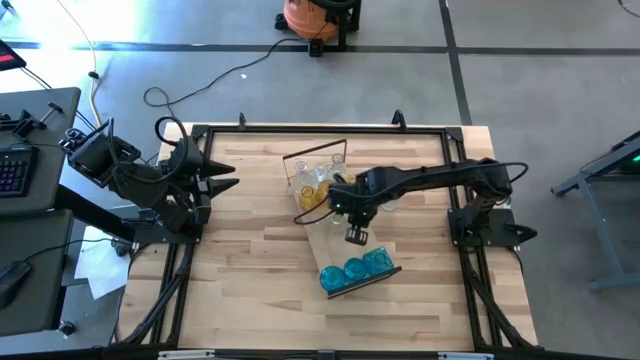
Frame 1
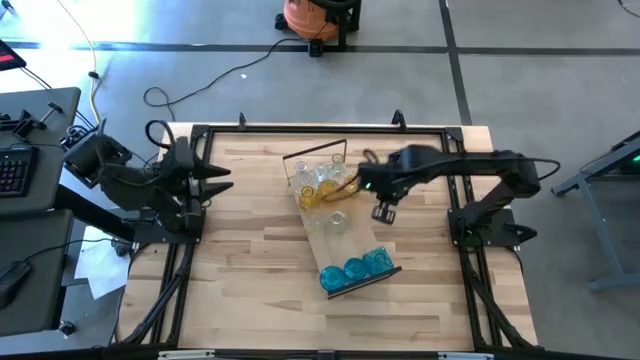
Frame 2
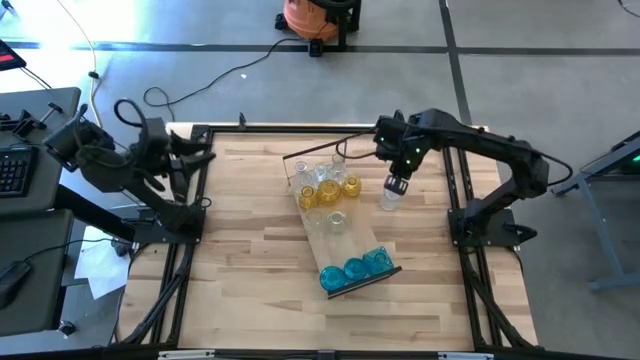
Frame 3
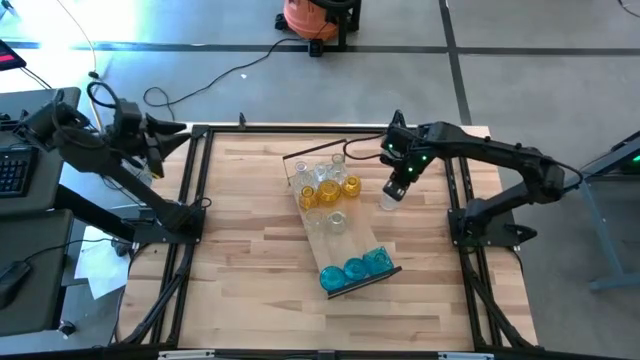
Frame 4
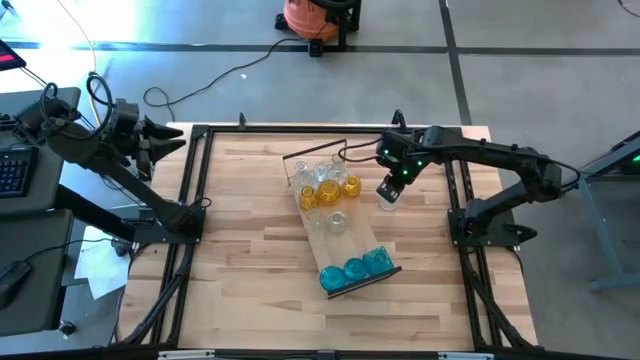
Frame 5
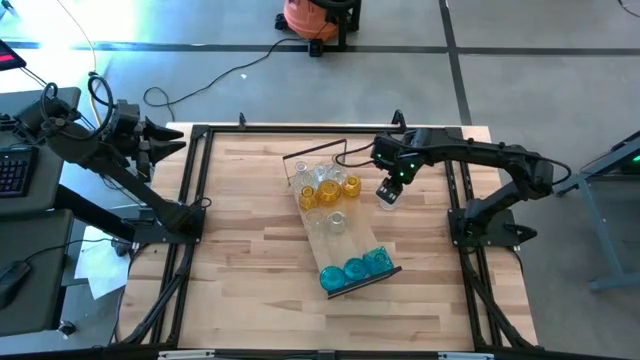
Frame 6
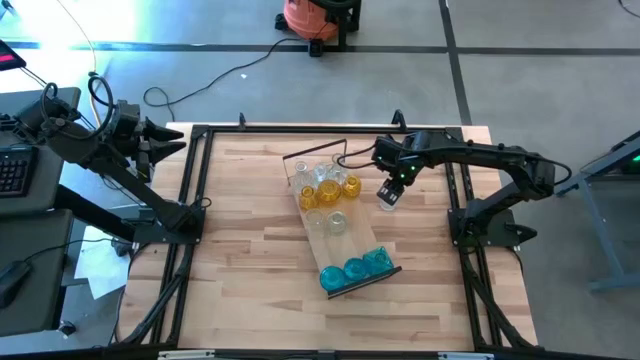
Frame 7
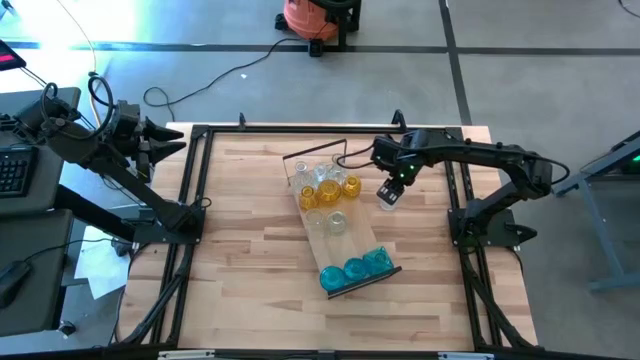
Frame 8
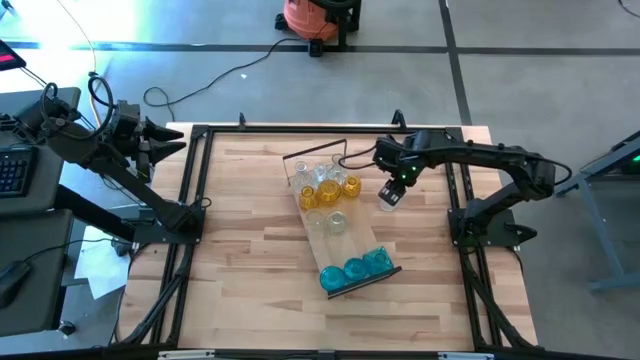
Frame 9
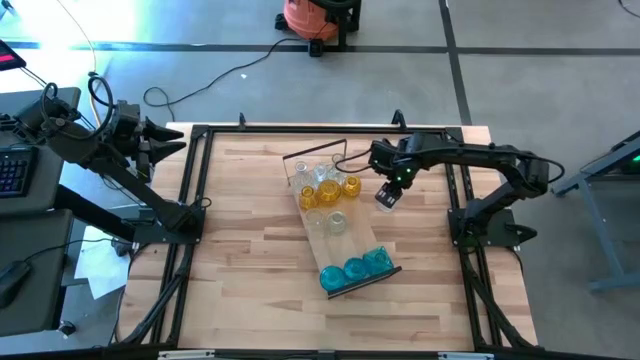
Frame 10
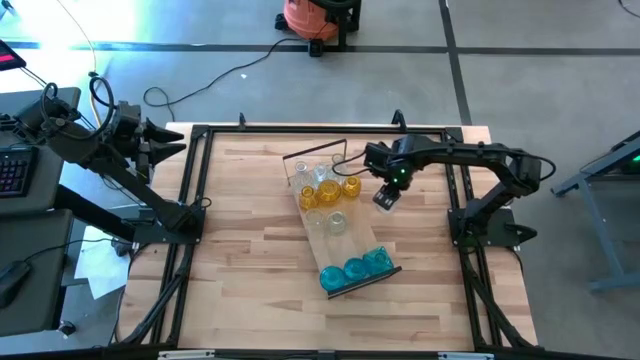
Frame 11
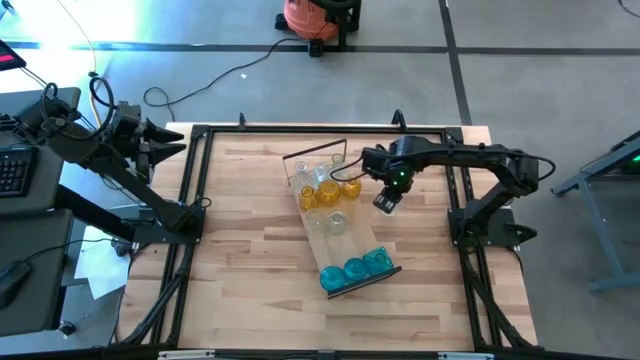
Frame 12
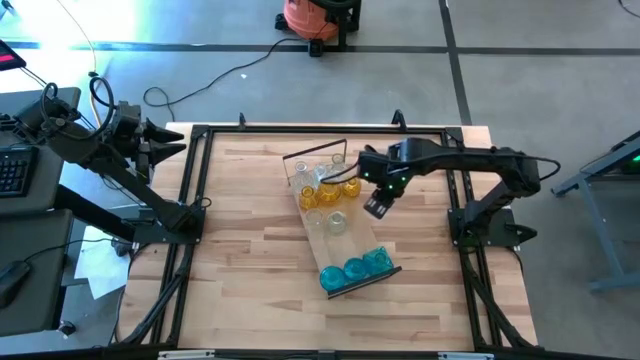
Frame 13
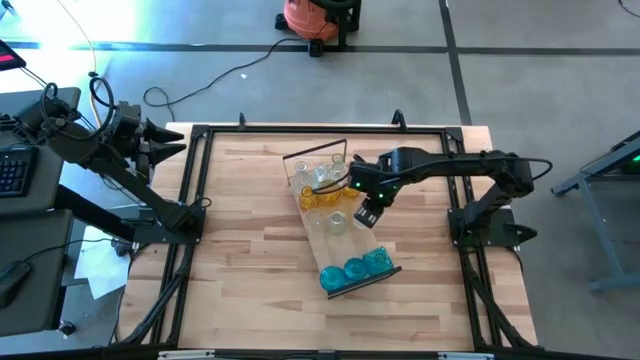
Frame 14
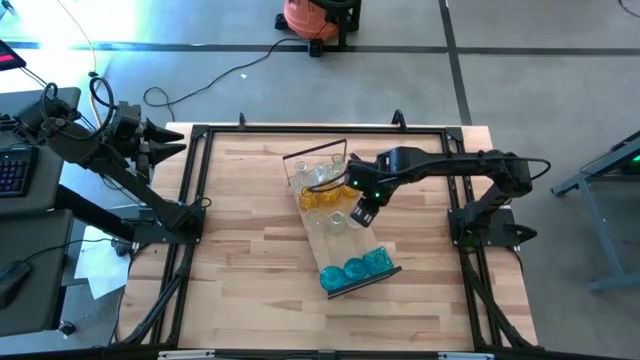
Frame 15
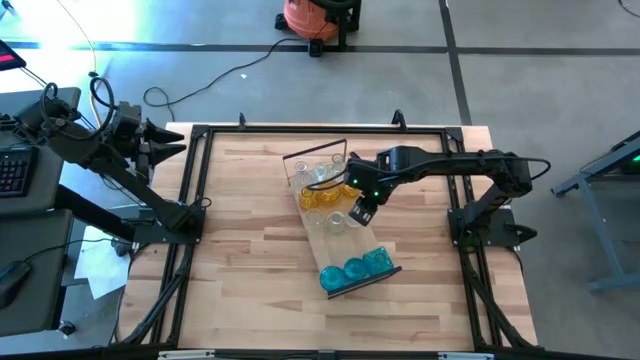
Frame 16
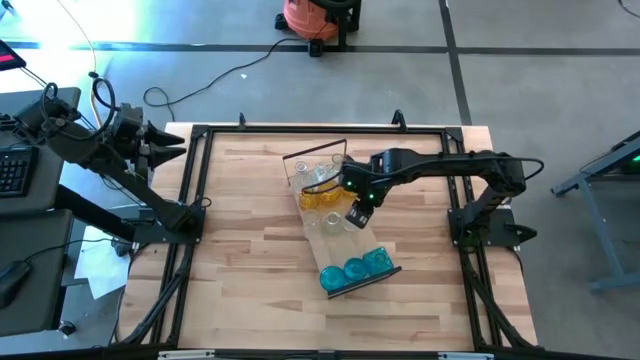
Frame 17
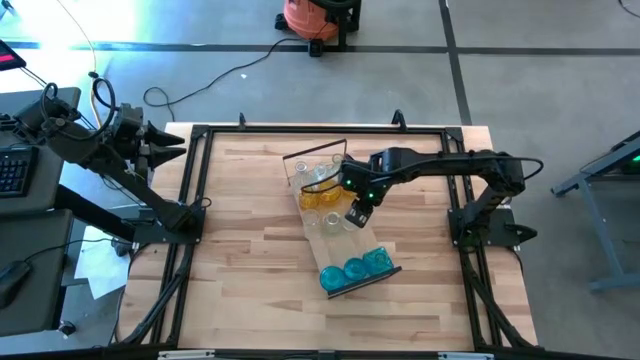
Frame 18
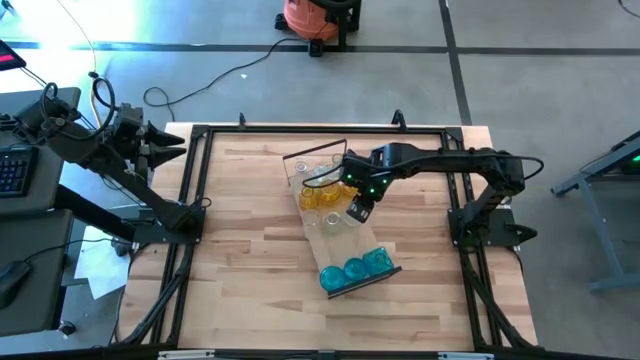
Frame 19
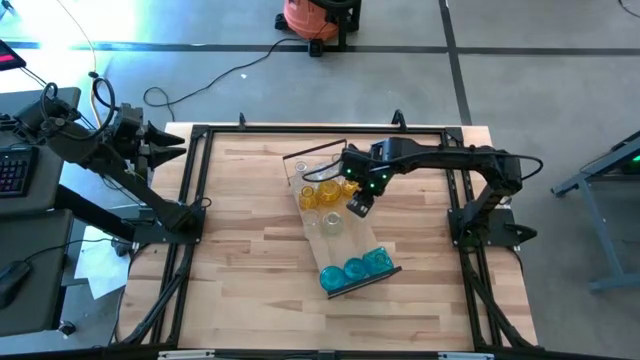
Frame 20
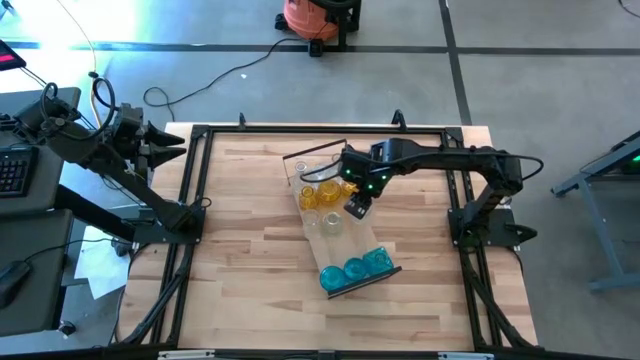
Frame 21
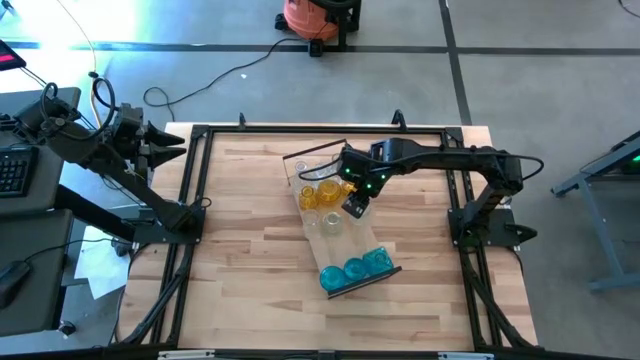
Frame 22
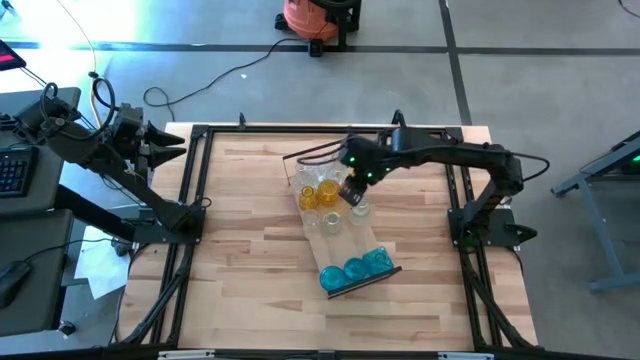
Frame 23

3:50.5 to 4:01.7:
Task: sort vases onto shelf
Put the transparent crystal vase on the shelf aligned with the other transparent crystal vases

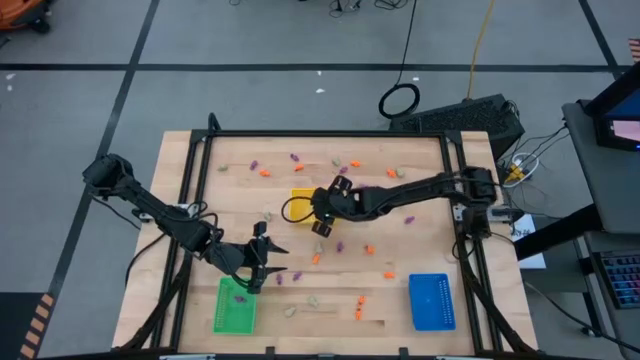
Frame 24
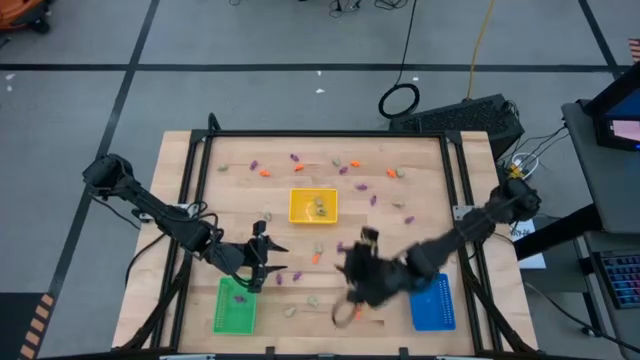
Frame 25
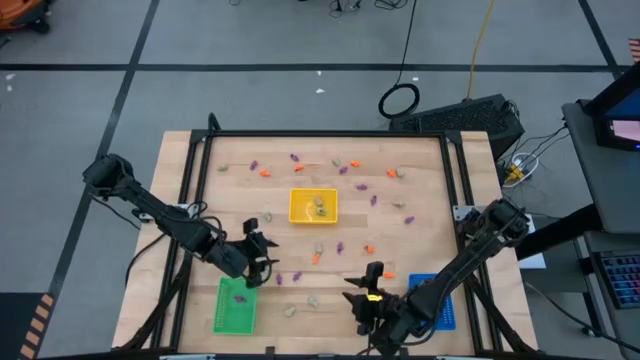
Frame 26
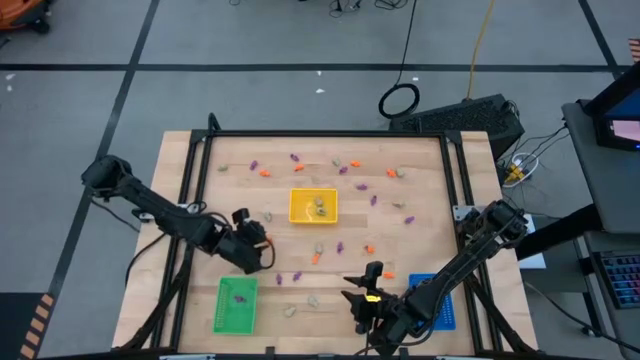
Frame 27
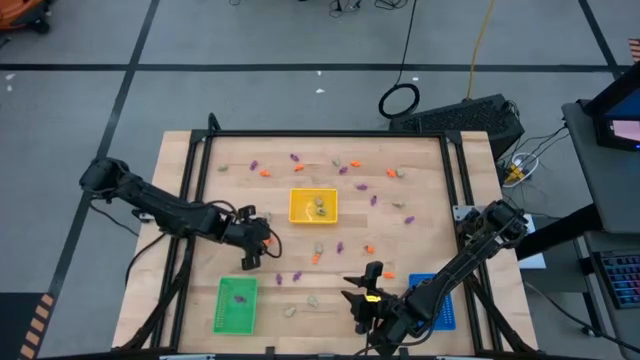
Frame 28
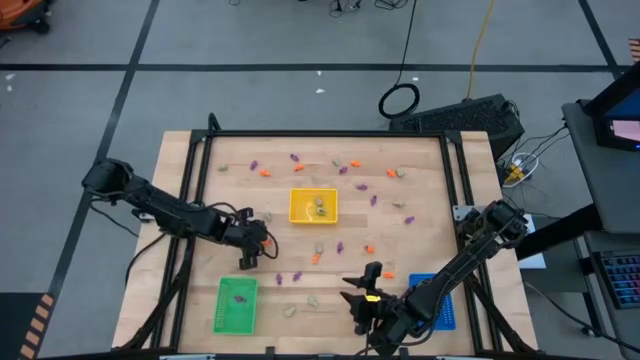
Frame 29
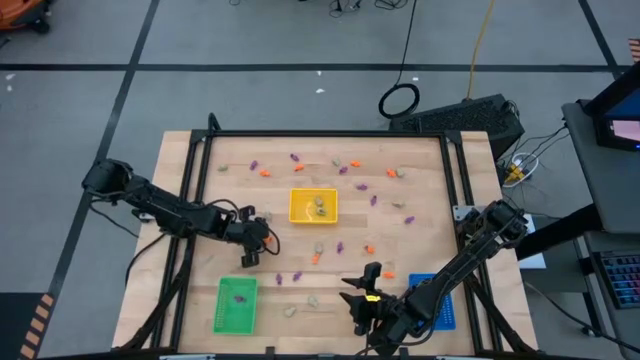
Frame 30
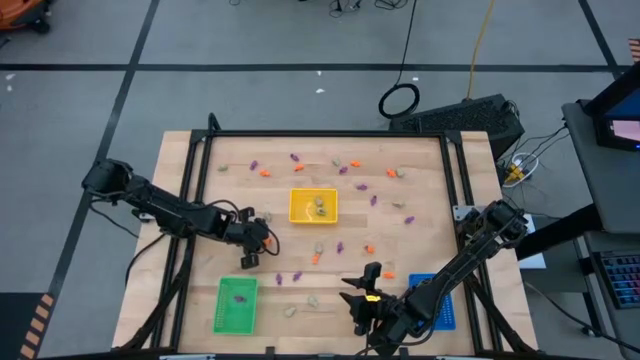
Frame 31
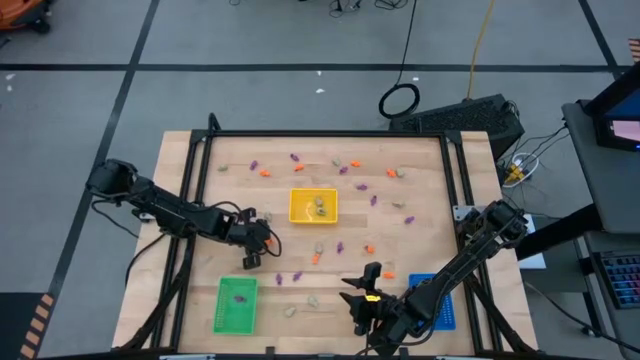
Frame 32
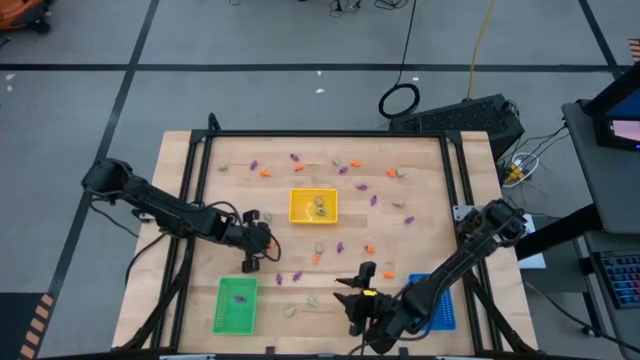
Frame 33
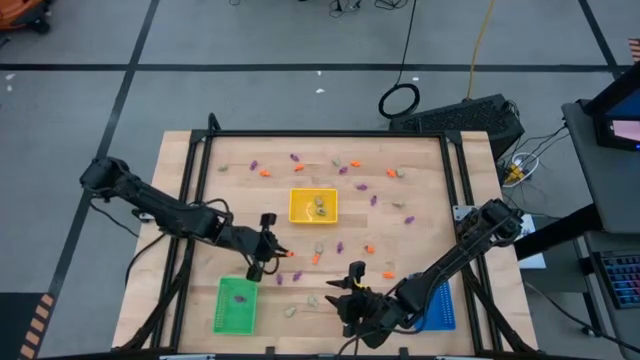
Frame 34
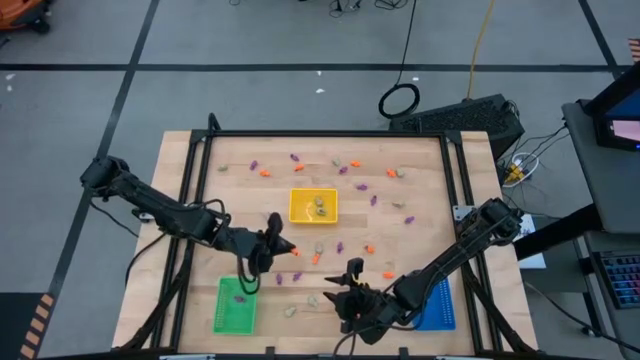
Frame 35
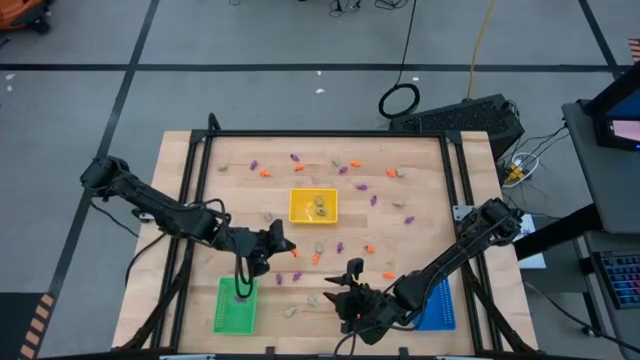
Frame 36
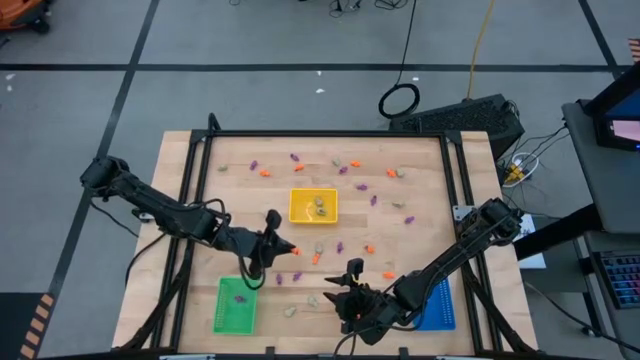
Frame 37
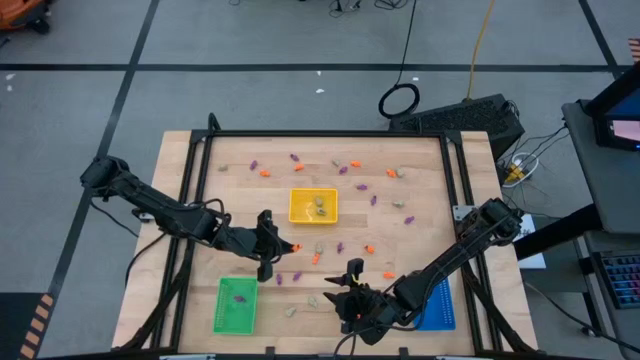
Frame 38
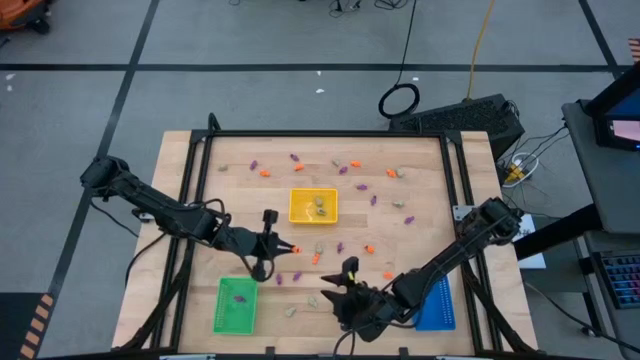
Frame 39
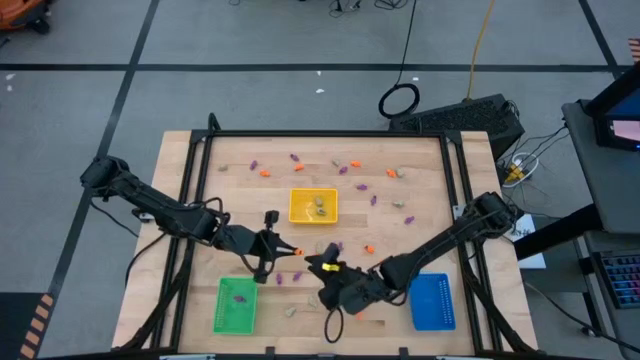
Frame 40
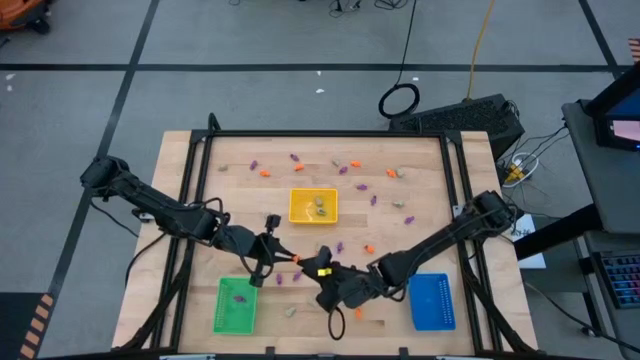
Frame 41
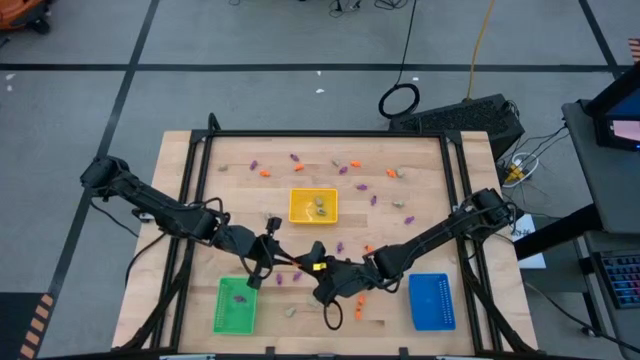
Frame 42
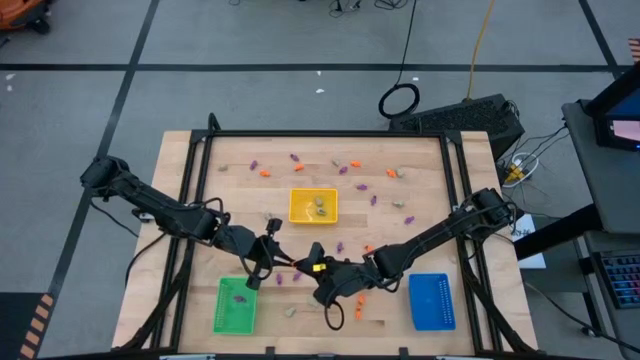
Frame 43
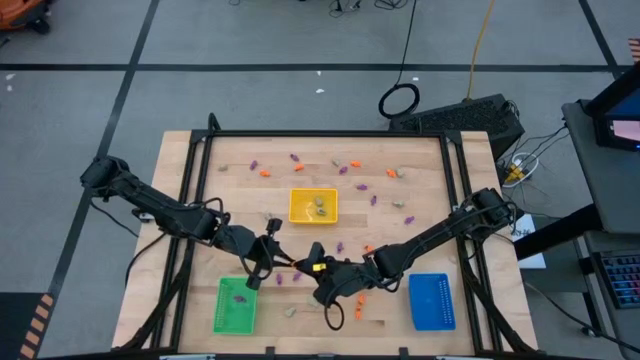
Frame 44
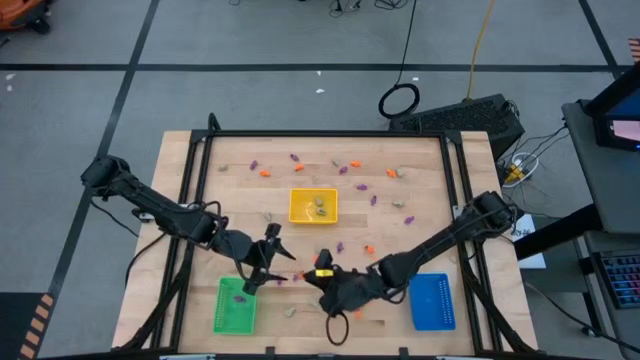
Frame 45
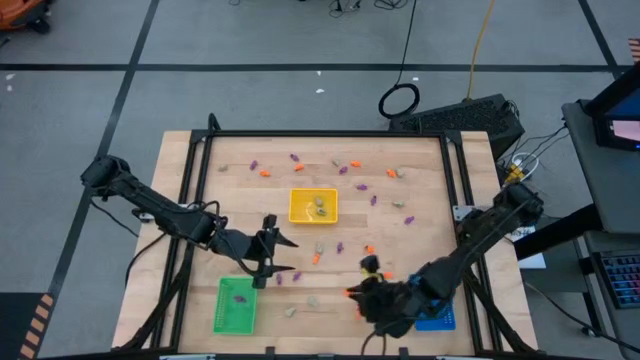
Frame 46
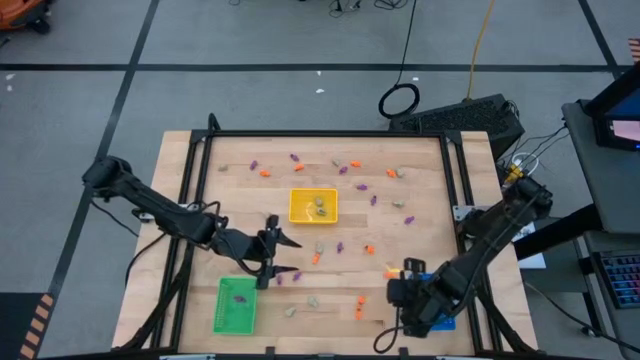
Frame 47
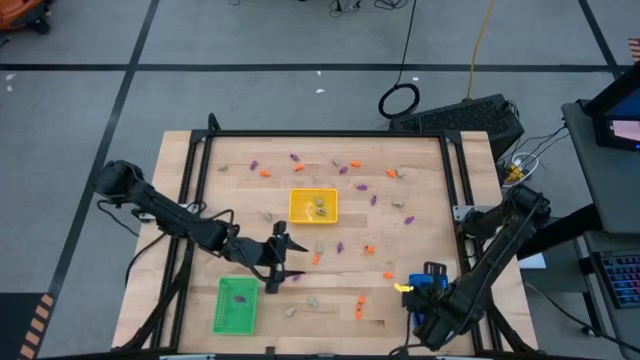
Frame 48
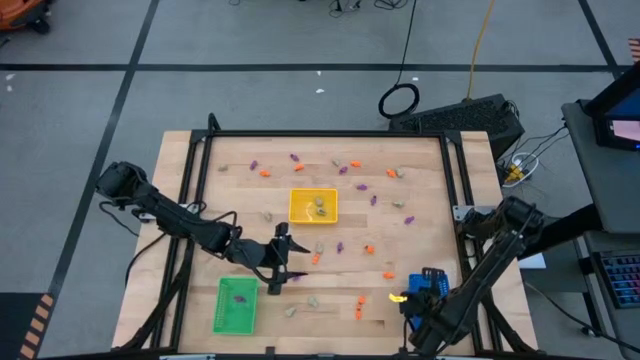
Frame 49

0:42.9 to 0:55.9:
Task: Sort Halloween decoration
Put the orange skeleton toy in the blue basket
